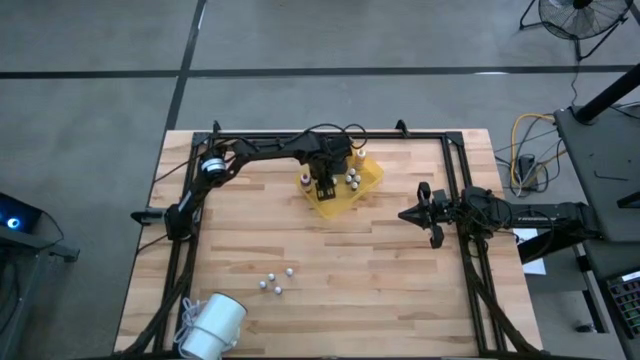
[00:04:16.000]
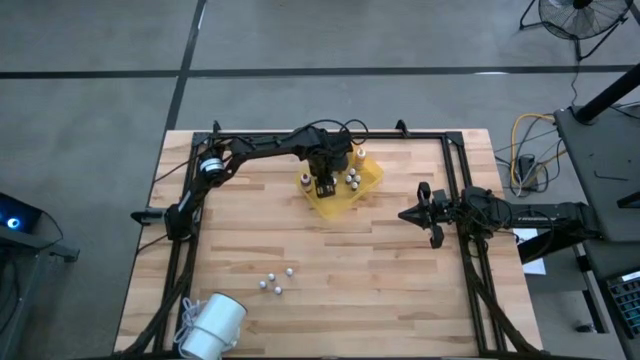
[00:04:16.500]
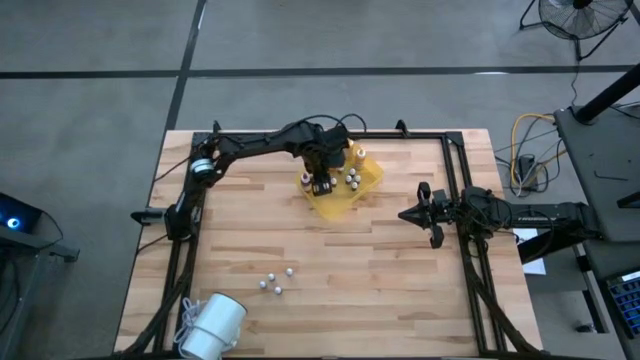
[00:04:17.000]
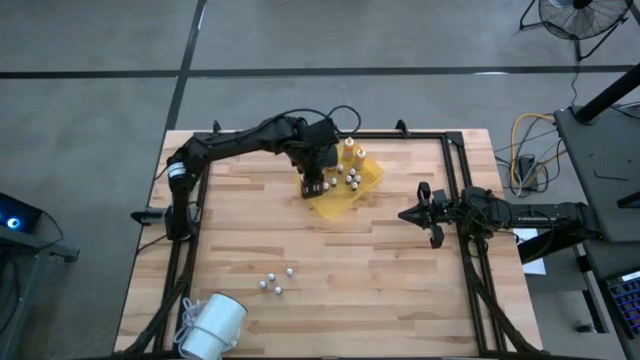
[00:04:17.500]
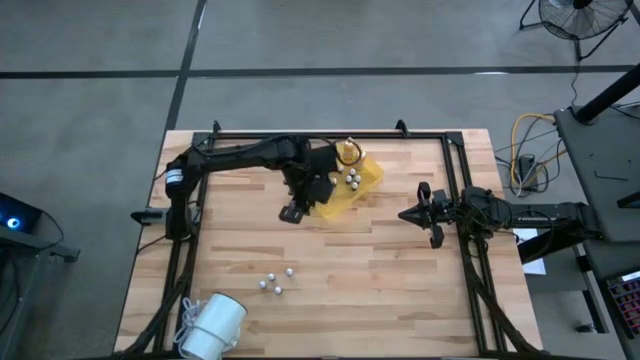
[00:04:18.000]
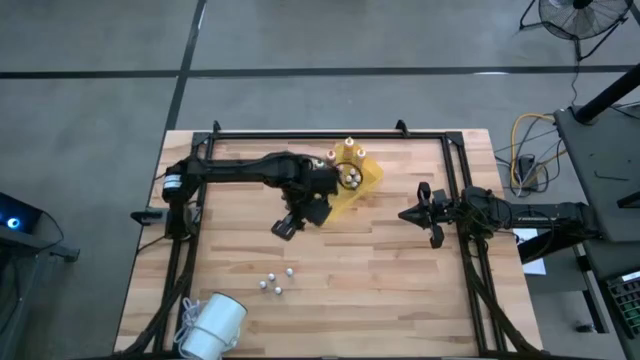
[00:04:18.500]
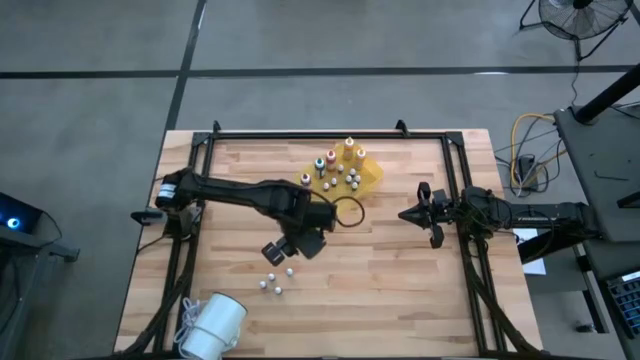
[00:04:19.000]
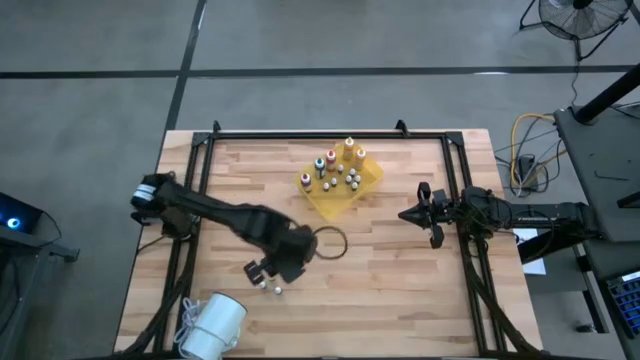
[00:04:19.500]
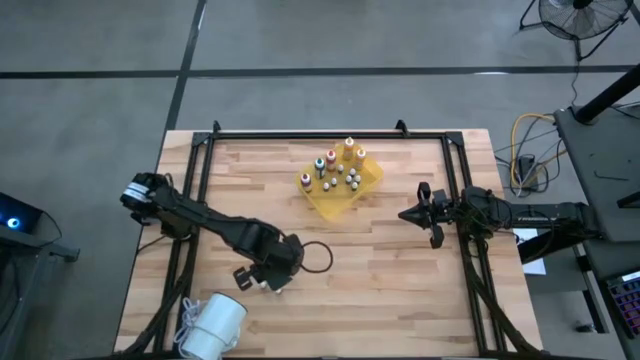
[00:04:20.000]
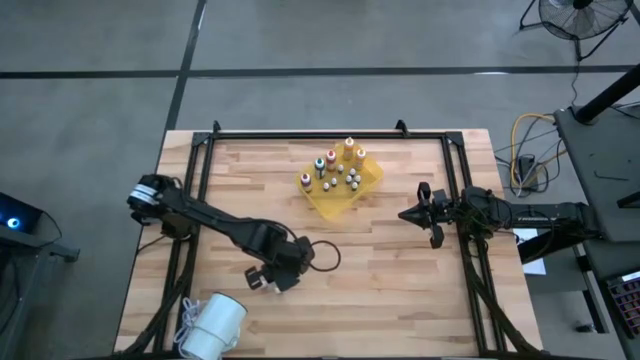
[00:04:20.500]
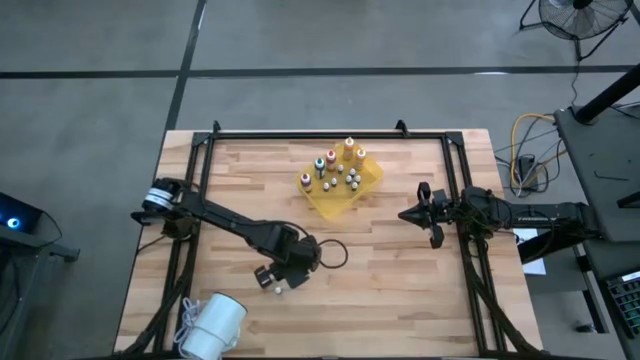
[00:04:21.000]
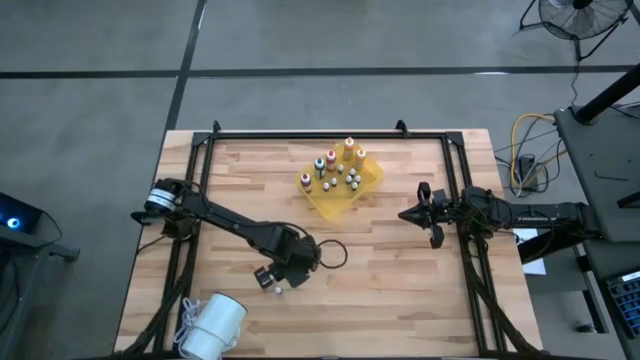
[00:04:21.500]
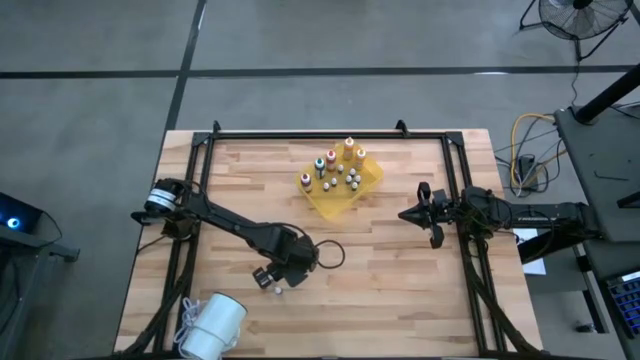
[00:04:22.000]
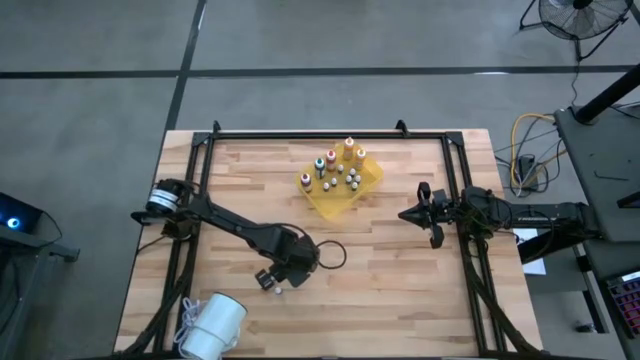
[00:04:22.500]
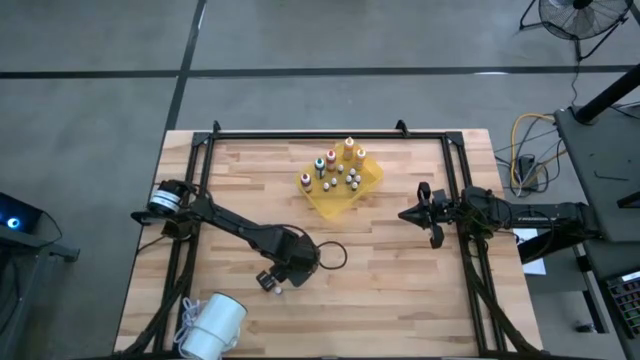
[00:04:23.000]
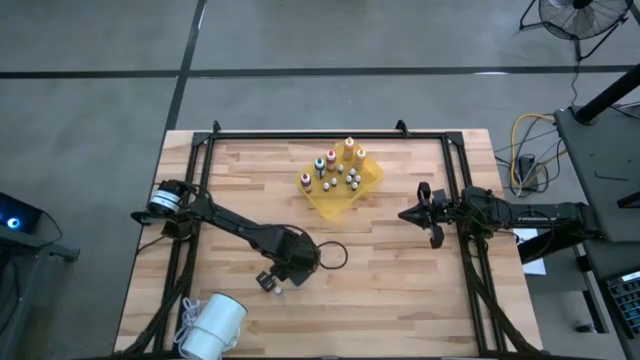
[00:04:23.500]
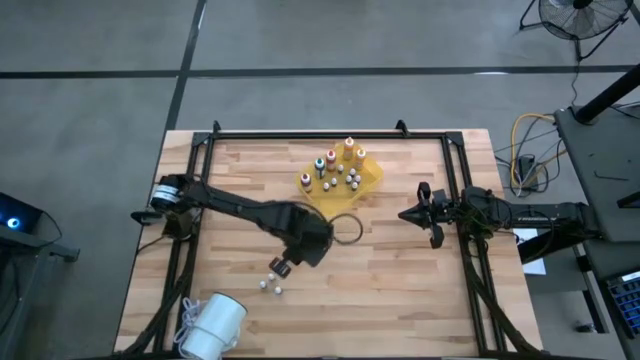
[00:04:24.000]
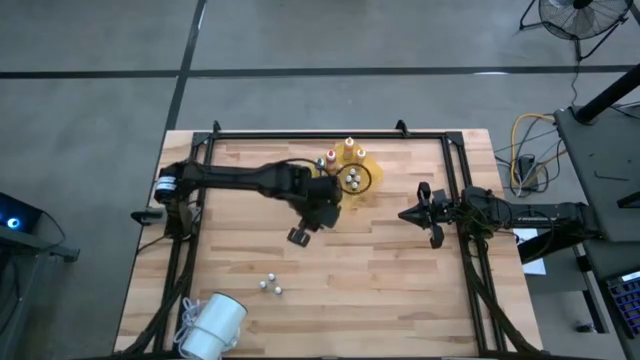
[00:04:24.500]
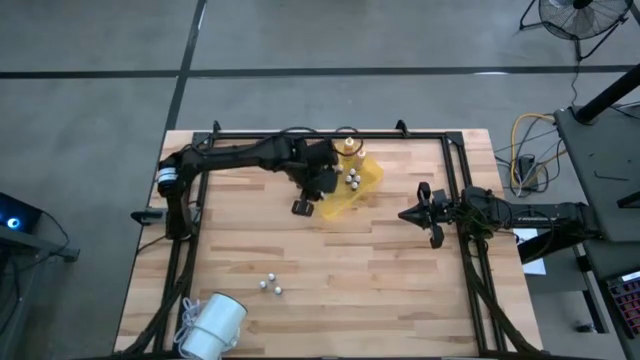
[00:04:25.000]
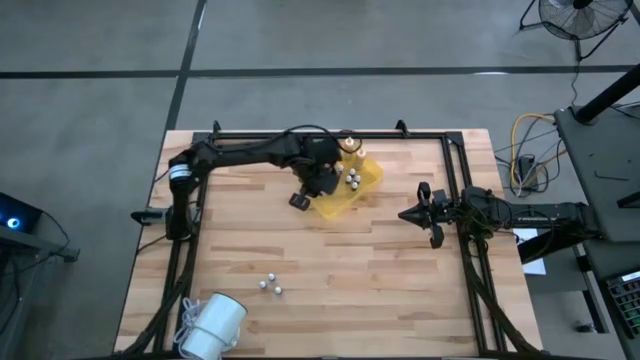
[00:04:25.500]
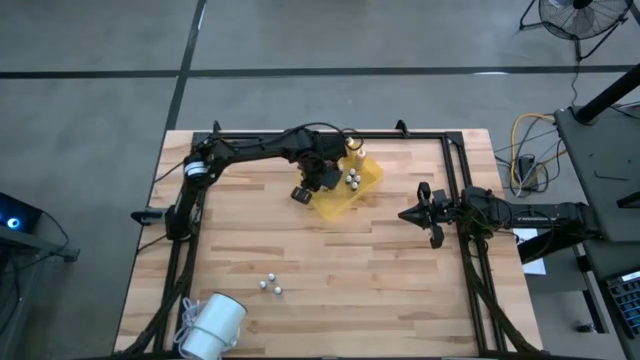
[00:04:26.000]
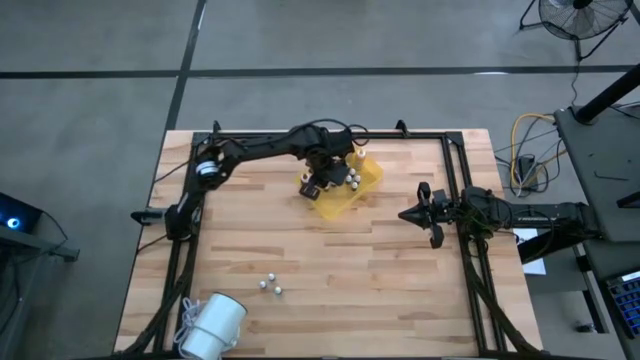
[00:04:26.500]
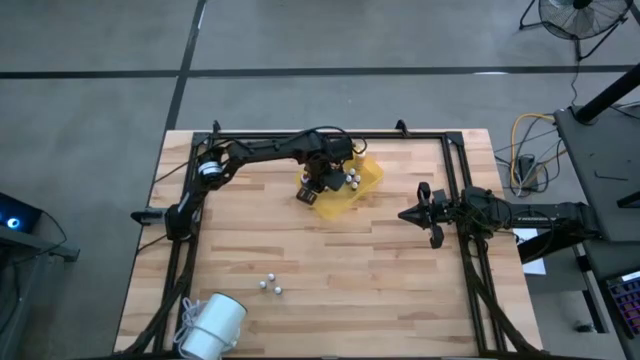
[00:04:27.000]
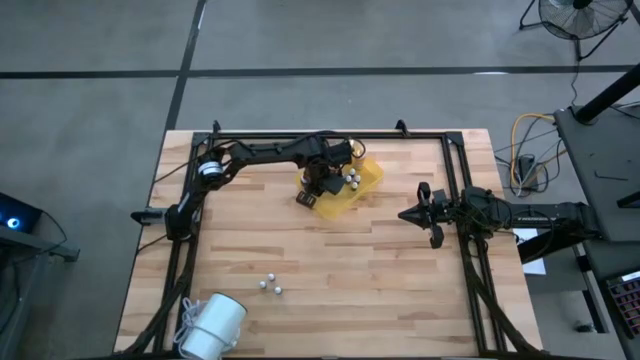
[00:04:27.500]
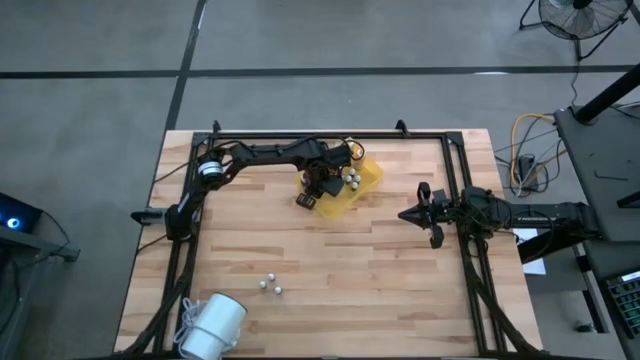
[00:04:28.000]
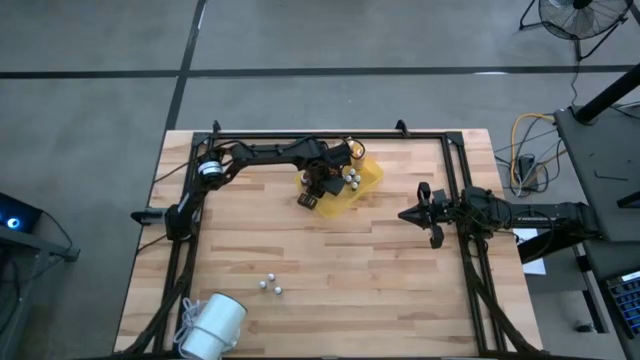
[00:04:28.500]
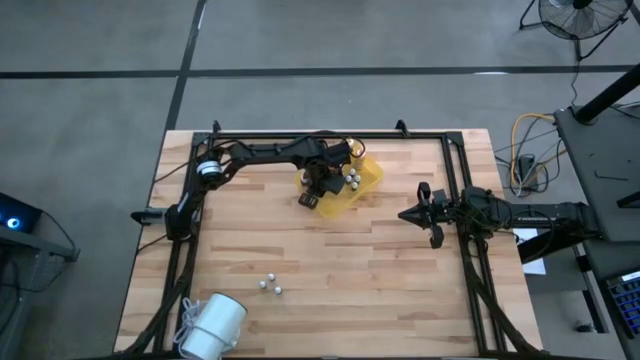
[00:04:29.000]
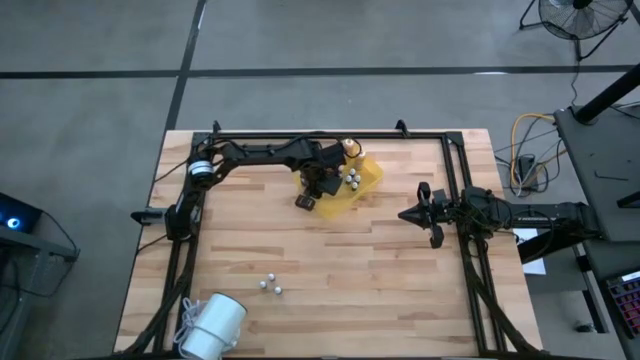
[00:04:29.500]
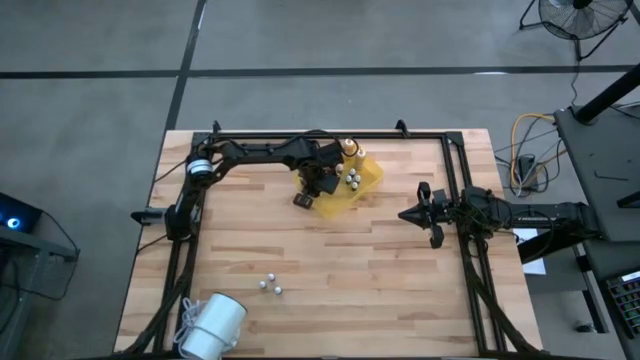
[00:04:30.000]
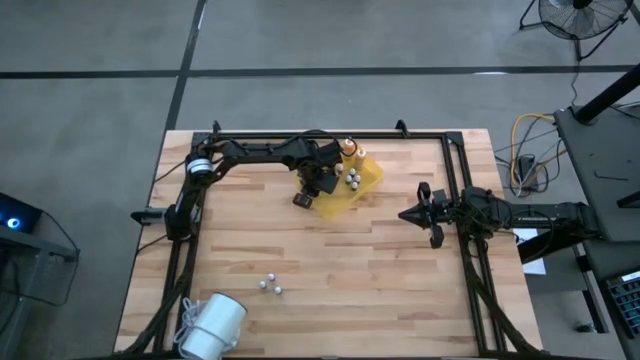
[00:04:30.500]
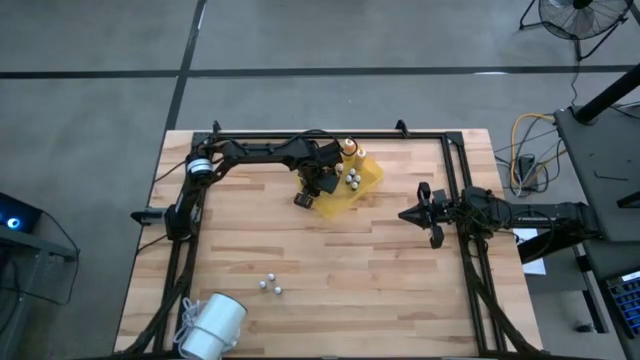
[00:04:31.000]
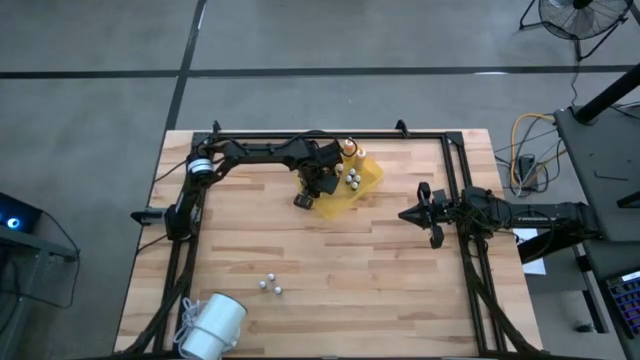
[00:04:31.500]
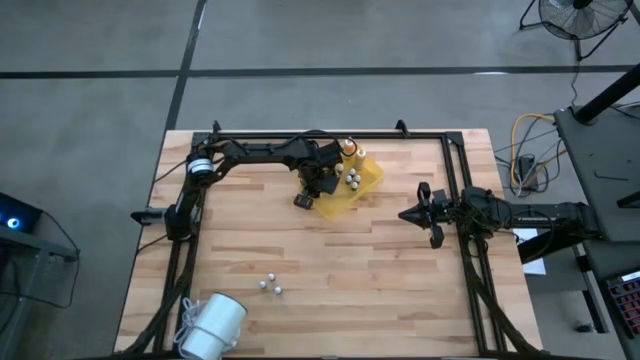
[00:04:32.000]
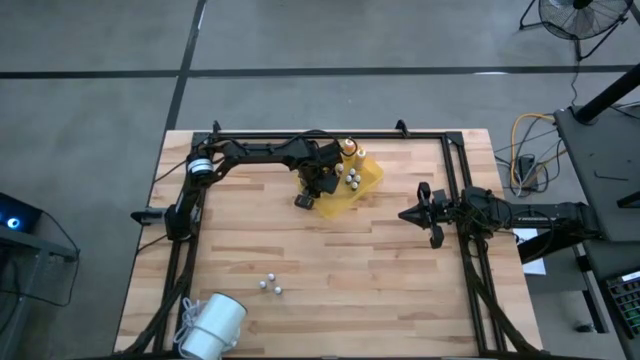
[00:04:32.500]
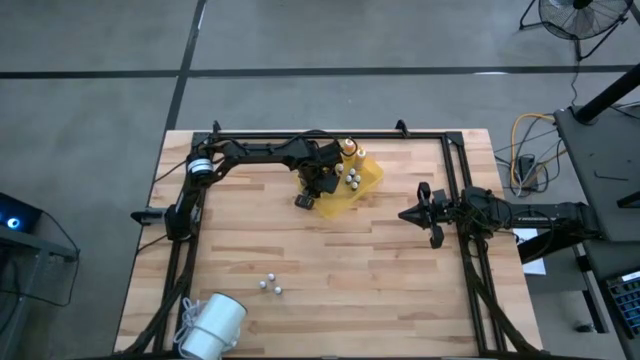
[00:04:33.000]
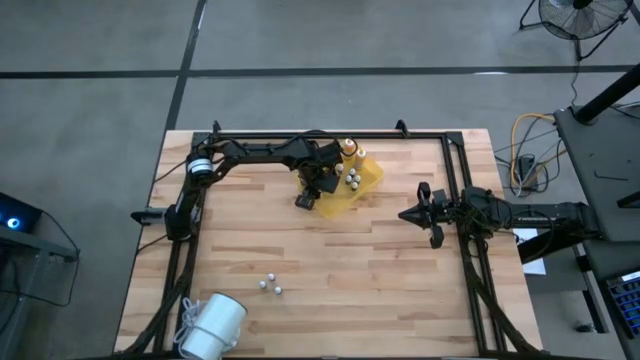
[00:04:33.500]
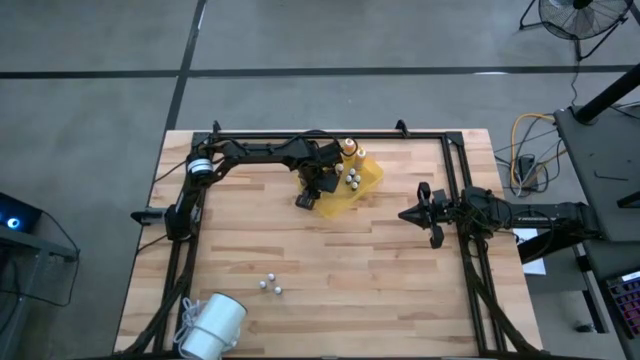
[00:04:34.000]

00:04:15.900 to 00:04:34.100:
Task: Pick & Place food coloring
Put the small black food coloring bottle into the yellow bin
